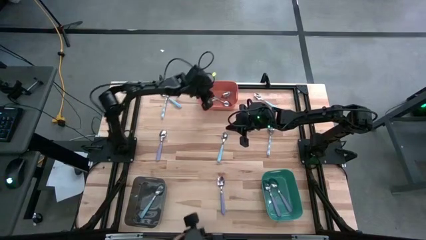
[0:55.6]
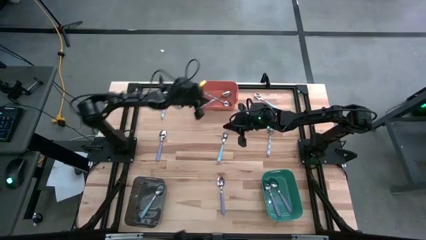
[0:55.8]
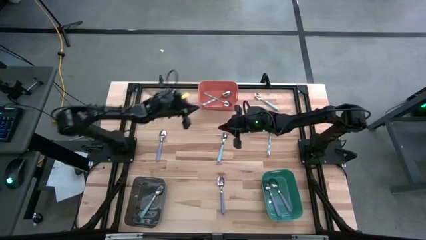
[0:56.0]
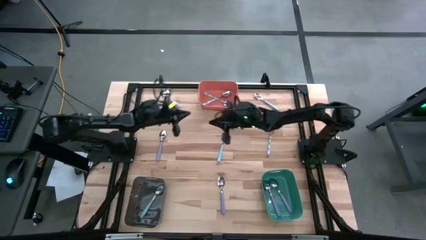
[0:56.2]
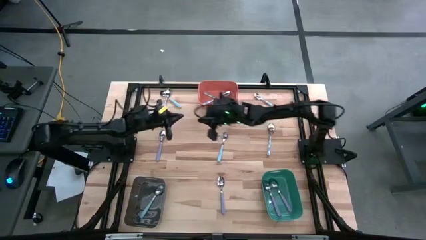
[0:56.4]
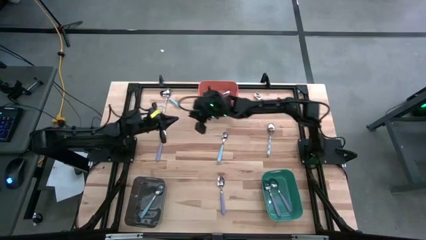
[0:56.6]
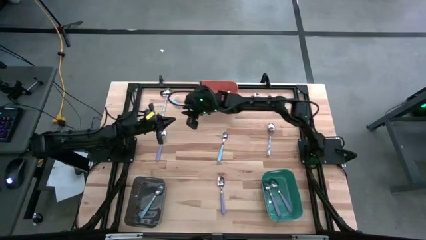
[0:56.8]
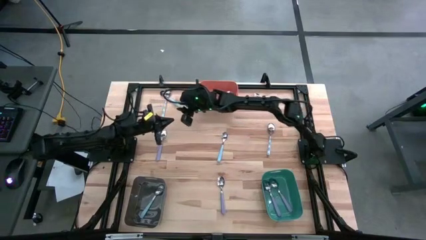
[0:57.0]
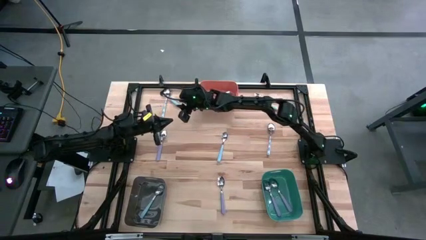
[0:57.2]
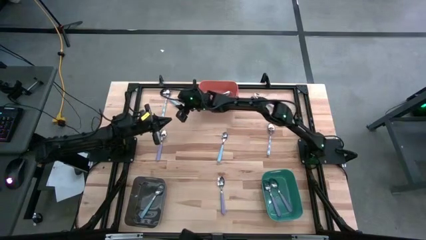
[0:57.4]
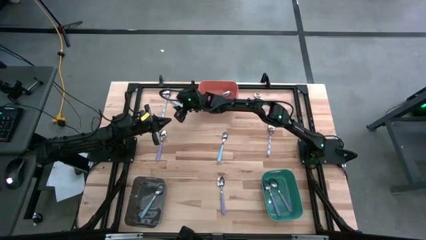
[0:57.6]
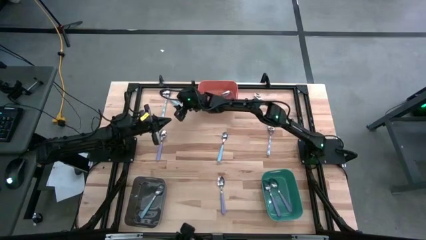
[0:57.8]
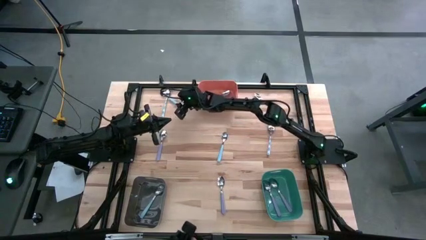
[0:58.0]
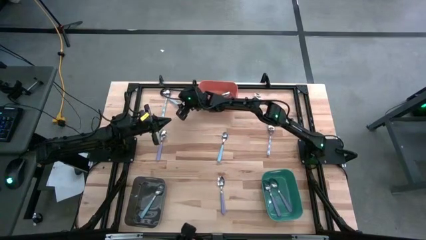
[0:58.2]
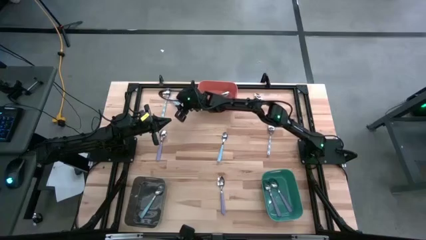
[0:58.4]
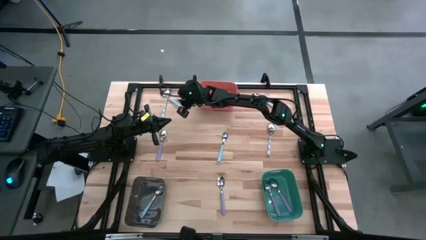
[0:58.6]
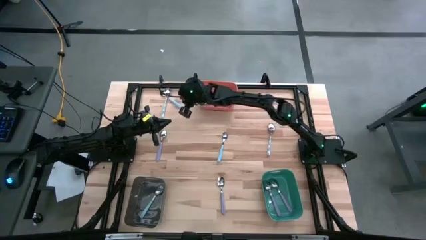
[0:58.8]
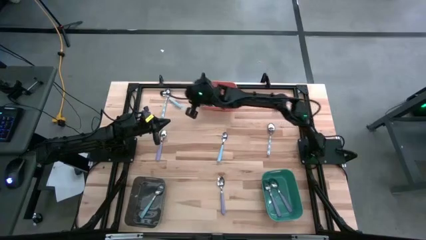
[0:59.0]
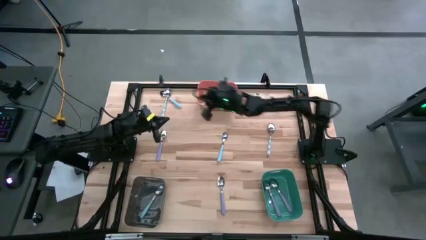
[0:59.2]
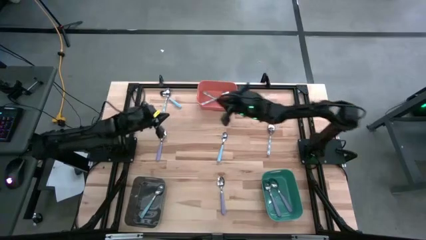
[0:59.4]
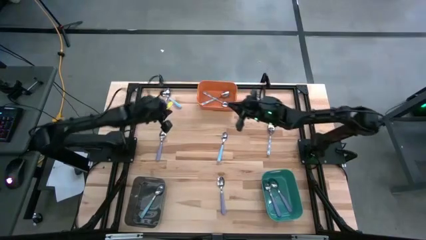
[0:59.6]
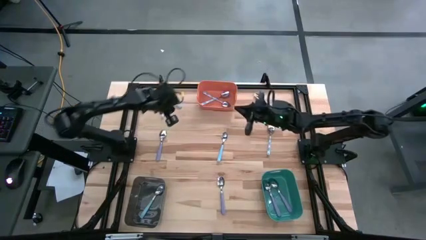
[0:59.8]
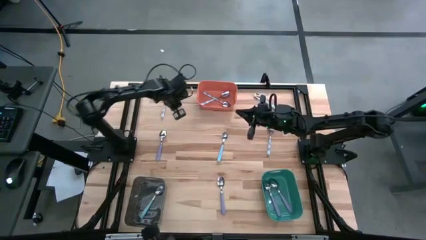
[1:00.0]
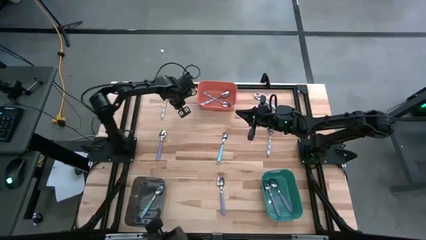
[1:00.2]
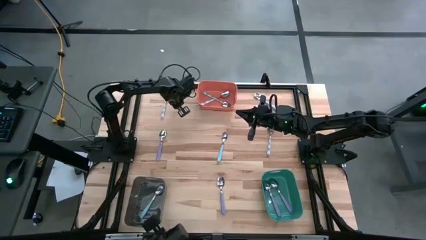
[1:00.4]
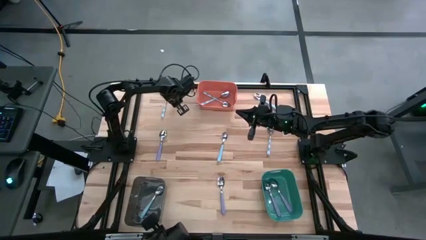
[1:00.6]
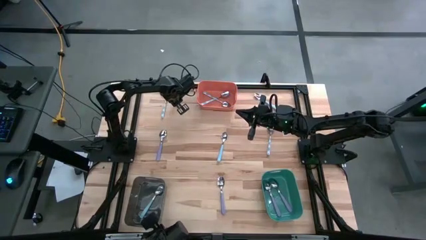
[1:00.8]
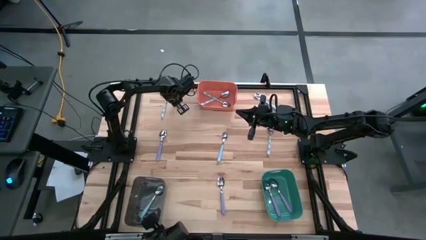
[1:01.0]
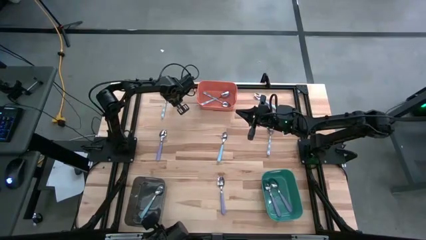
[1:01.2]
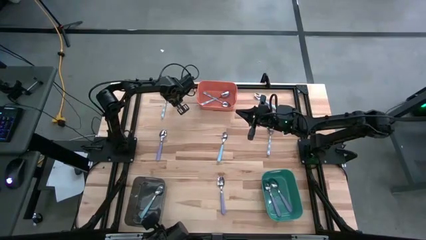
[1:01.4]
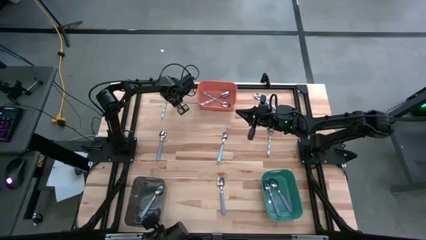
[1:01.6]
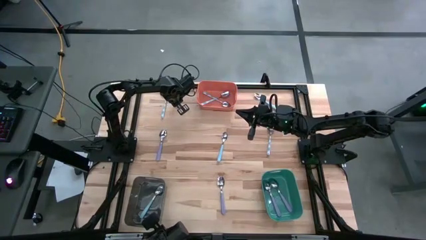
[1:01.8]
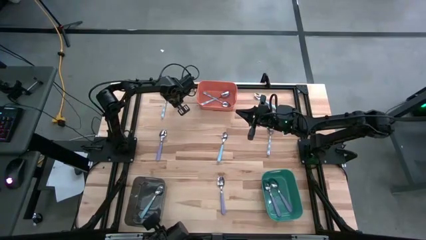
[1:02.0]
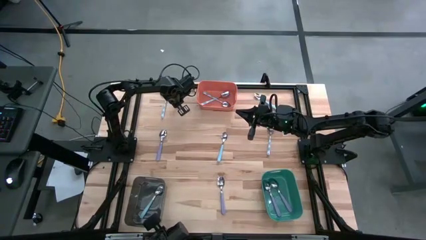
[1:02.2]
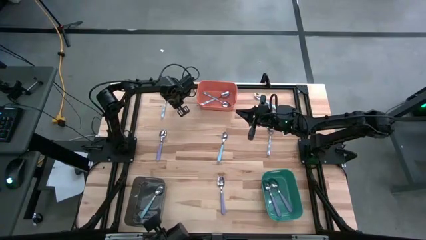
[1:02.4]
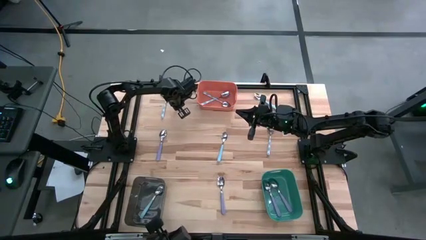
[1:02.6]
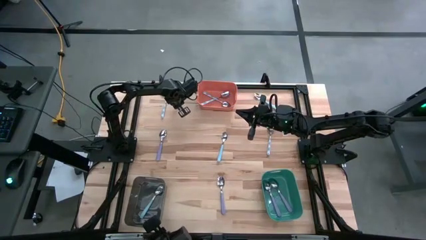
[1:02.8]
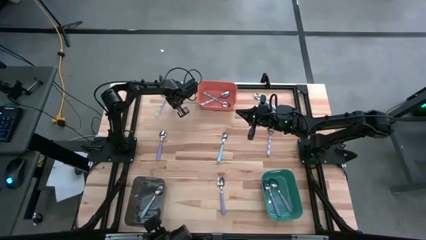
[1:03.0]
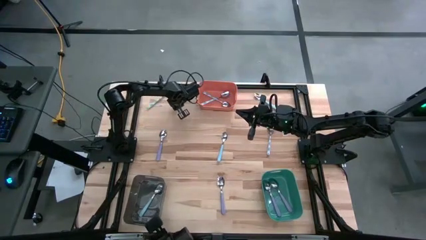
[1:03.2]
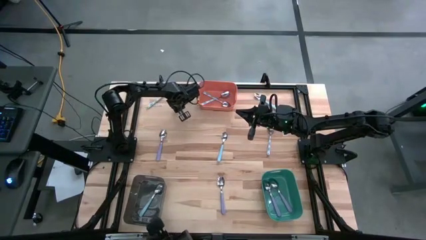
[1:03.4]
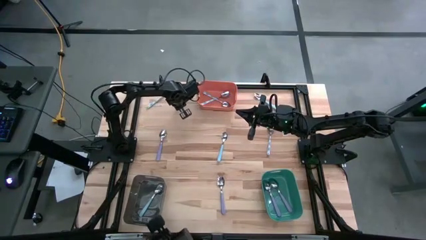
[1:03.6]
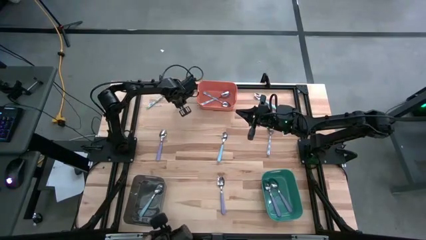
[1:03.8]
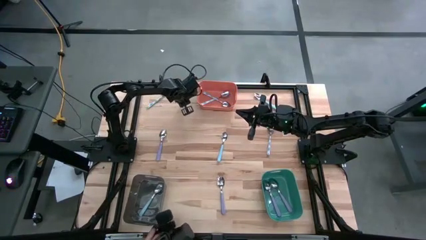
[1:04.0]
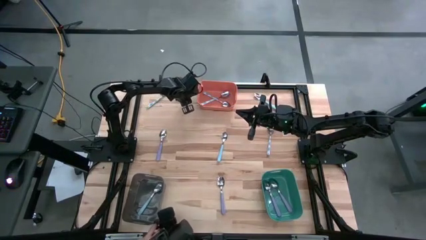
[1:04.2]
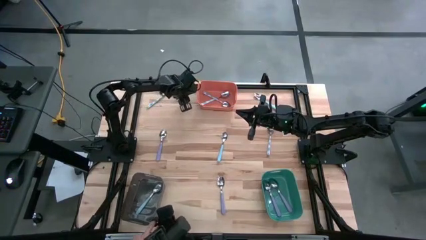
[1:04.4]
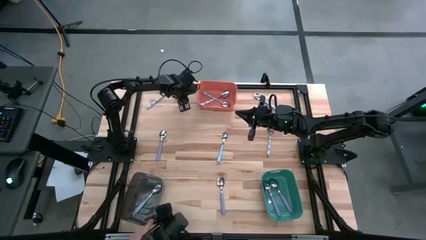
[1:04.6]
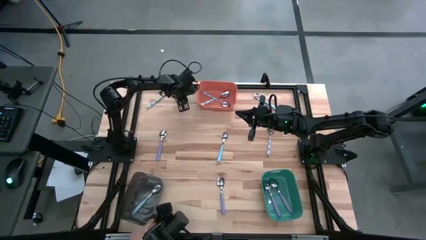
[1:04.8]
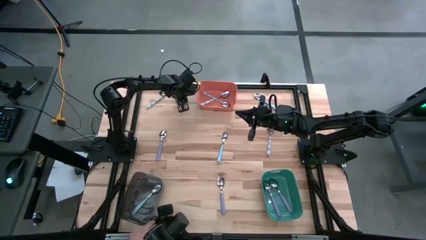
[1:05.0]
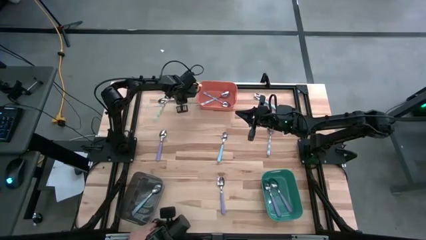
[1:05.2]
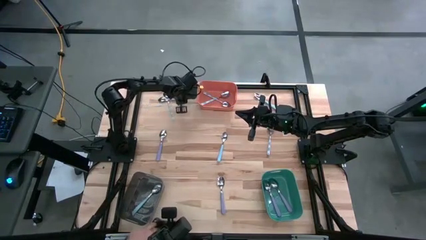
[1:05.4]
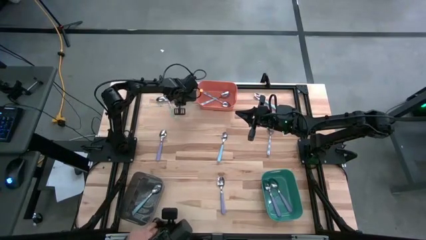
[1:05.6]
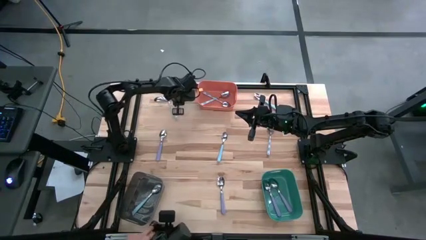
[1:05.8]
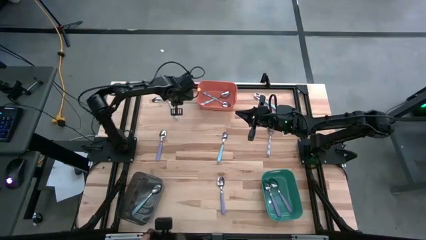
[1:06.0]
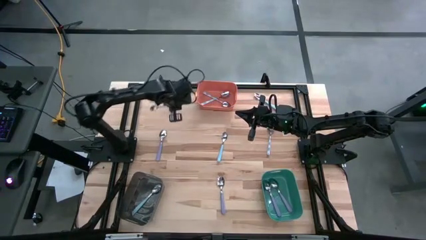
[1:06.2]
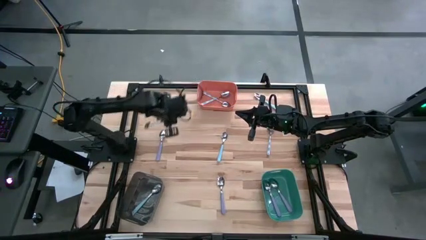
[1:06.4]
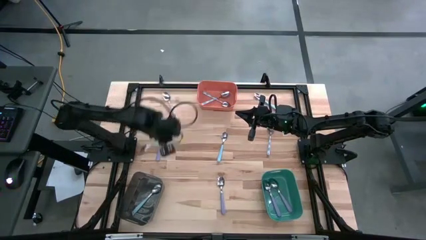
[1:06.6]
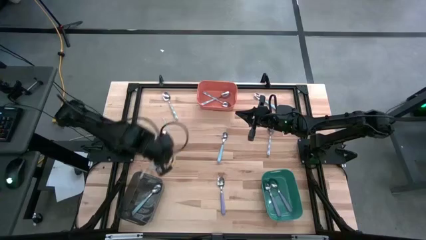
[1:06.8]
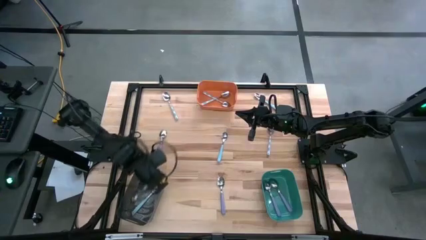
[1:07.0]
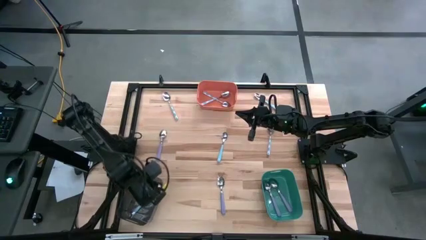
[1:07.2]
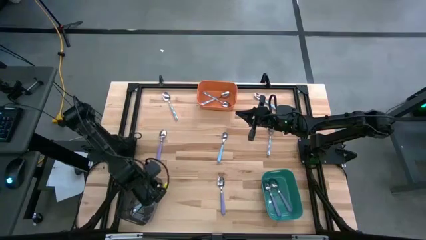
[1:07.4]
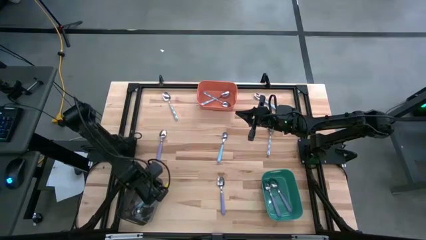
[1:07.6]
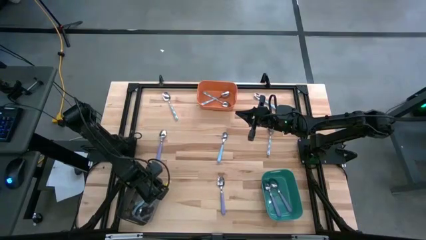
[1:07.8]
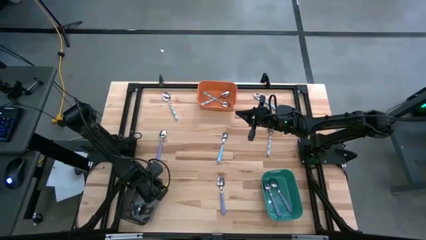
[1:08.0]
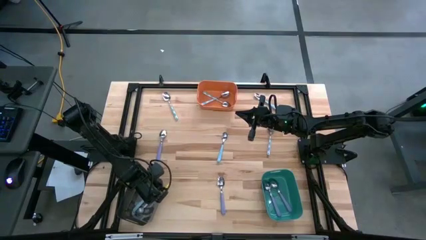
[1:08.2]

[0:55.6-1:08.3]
Task: Sort silverware by color (type)
Put the top left blue spoon into the black bin

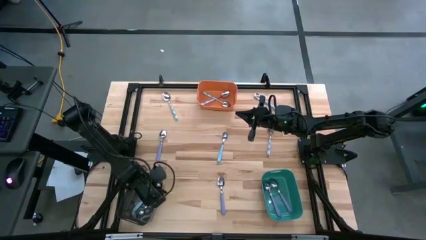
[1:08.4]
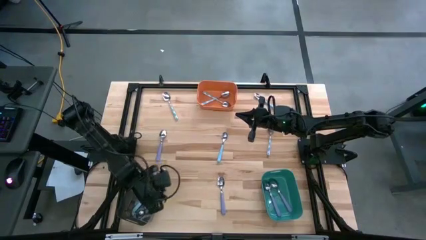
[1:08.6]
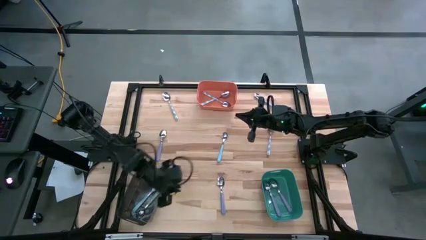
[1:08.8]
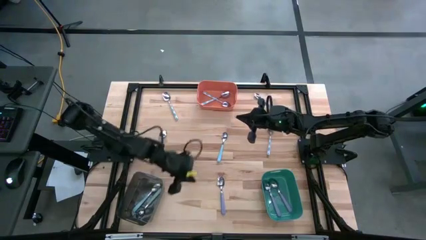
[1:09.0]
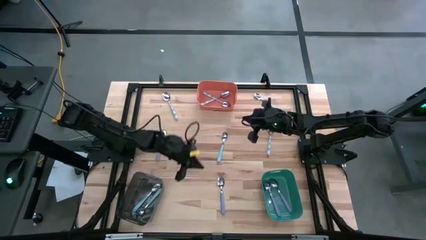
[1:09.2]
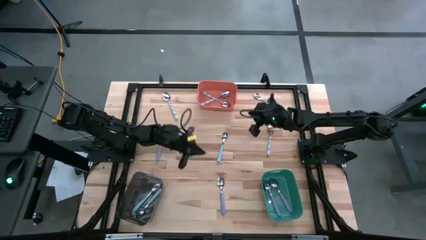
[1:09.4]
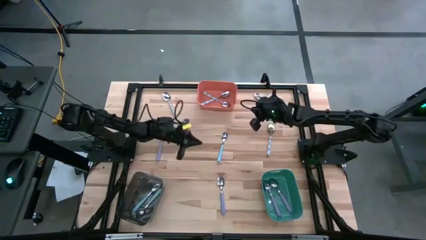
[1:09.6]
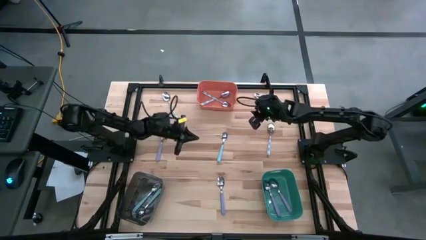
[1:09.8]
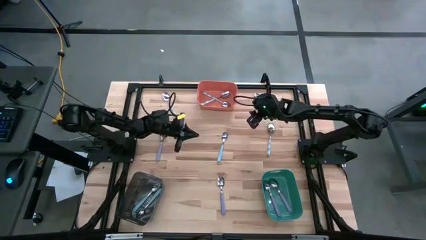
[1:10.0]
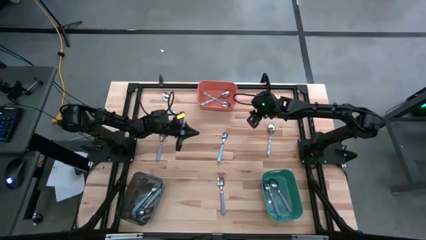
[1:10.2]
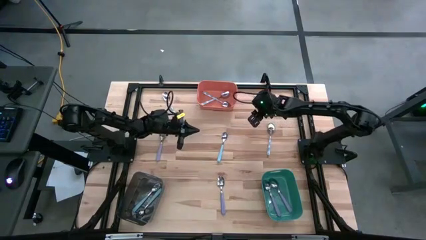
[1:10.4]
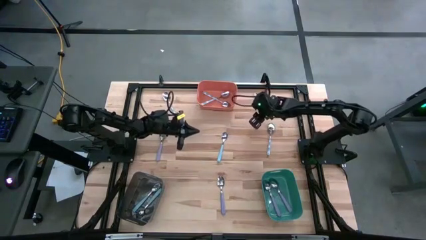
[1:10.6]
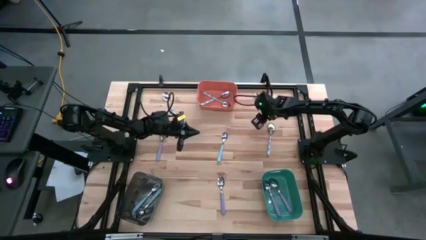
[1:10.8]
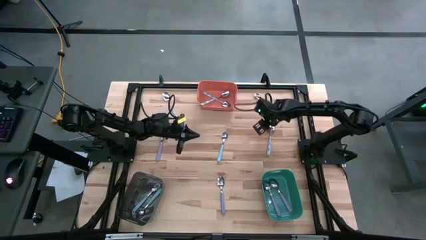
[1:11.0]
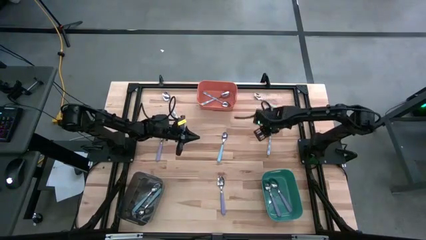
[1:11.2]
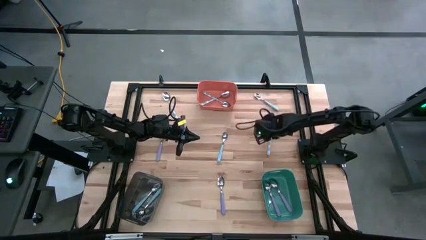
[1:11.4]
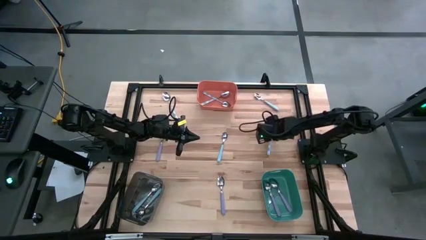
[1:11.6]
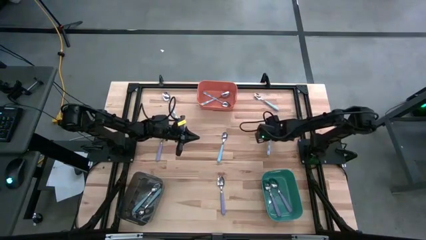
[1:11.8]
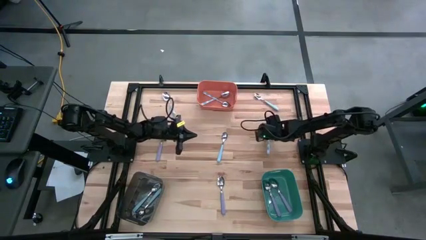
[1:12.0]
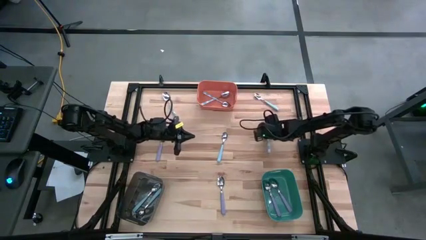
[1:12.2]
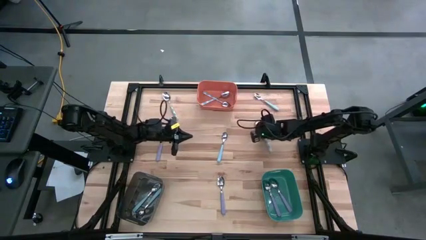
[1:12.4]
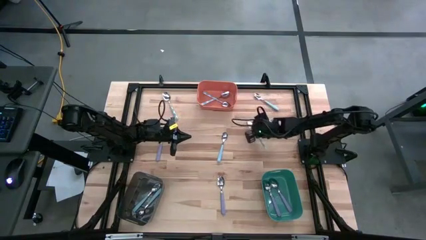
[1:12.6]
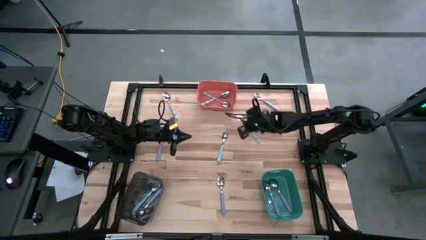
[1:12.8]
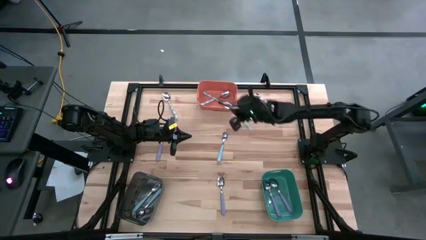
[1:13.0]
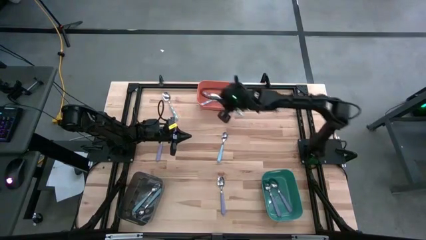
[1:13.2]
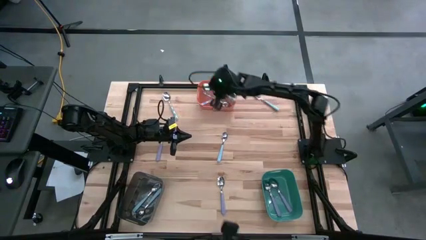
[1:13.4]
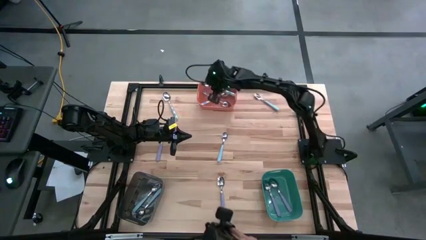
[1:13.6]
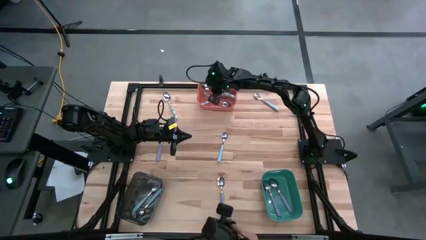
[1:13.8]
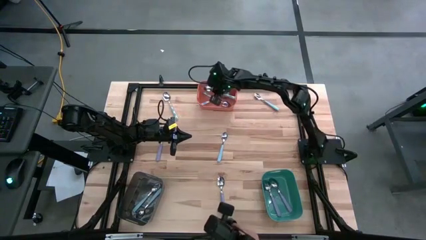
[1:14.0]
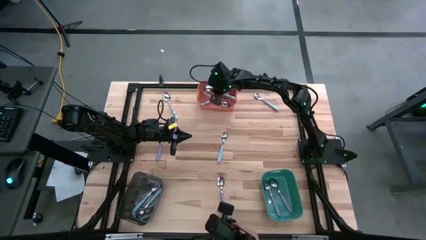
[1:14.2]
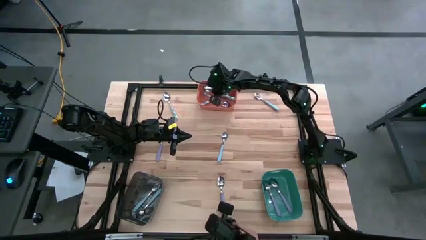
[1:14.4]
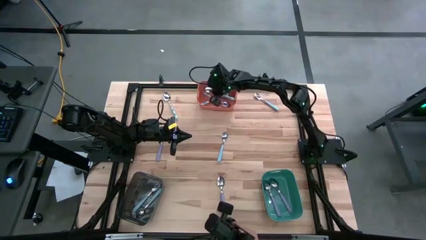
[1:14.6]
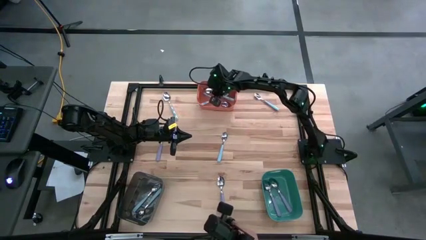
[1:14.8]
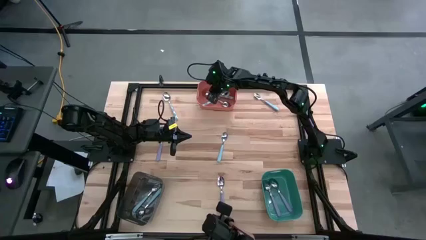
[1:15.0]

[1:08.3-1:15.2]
Put the middle right blue and white spoon into the orange bin
